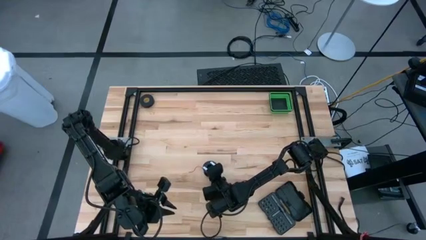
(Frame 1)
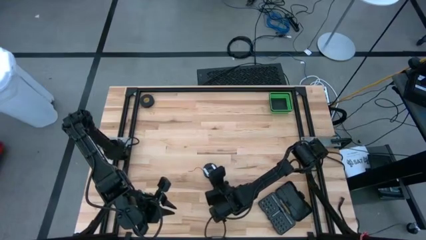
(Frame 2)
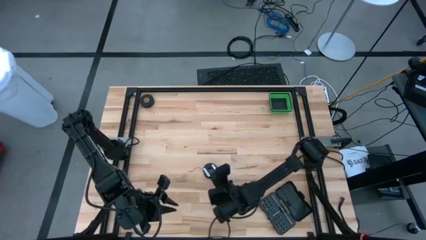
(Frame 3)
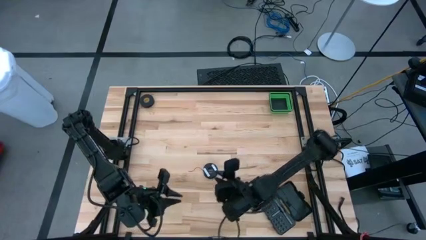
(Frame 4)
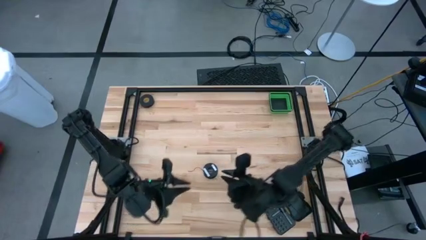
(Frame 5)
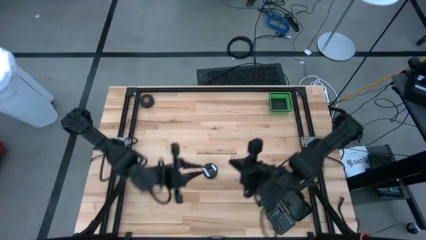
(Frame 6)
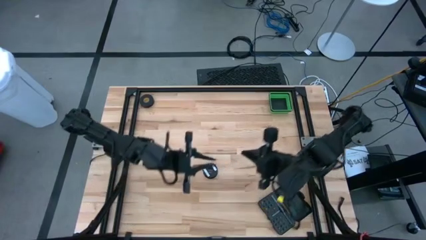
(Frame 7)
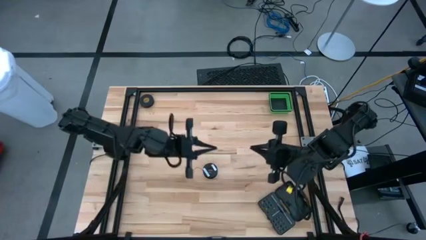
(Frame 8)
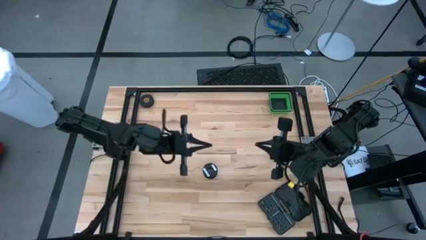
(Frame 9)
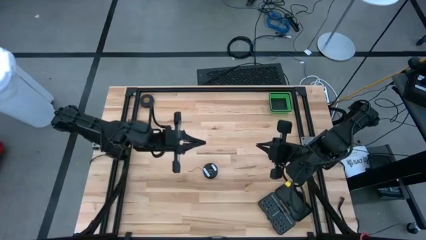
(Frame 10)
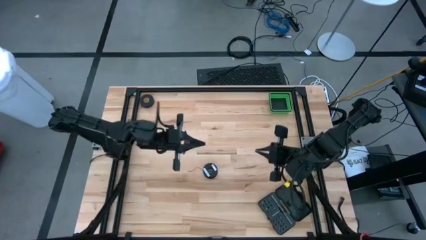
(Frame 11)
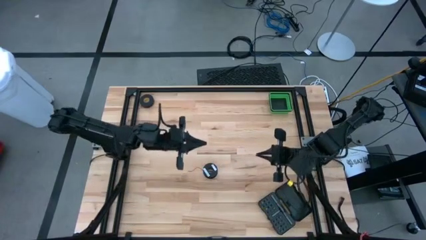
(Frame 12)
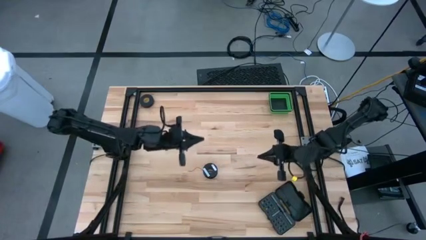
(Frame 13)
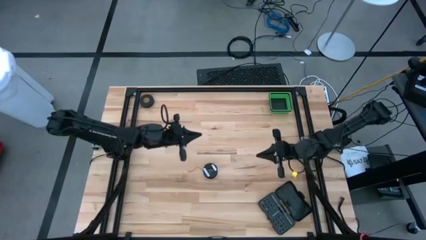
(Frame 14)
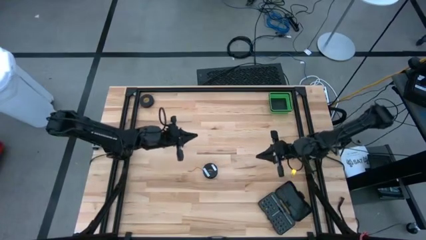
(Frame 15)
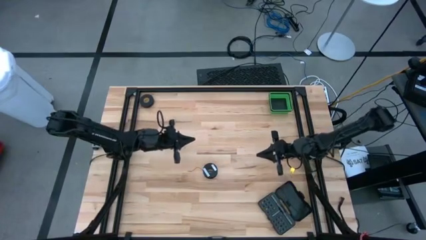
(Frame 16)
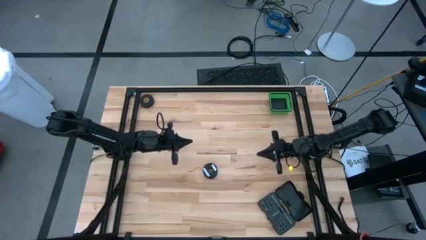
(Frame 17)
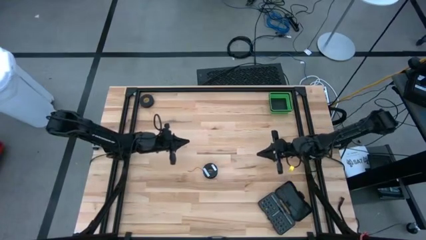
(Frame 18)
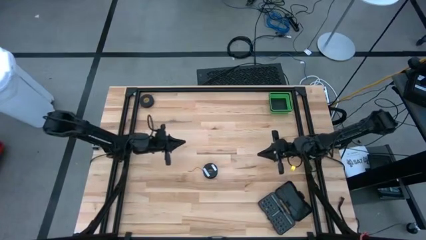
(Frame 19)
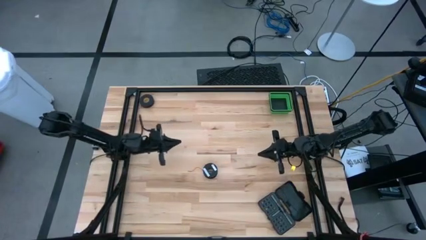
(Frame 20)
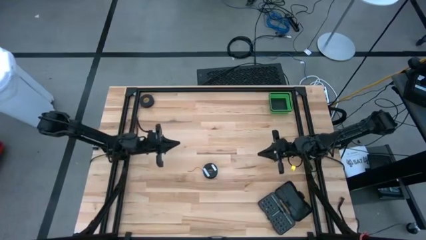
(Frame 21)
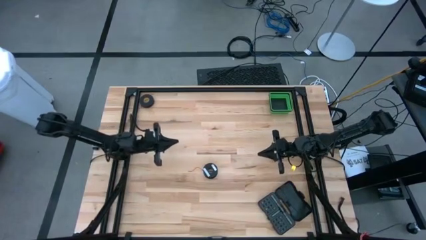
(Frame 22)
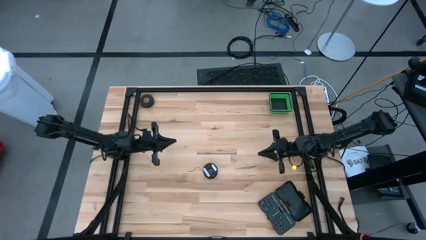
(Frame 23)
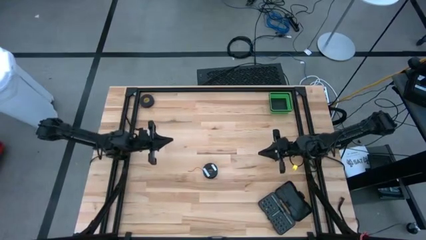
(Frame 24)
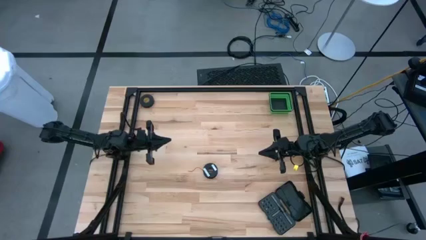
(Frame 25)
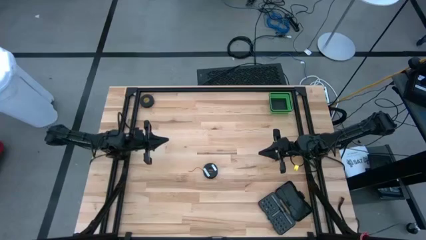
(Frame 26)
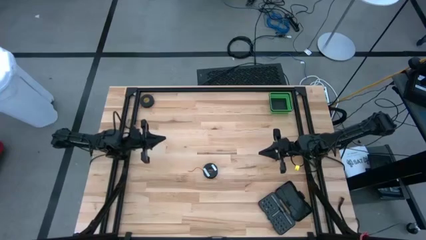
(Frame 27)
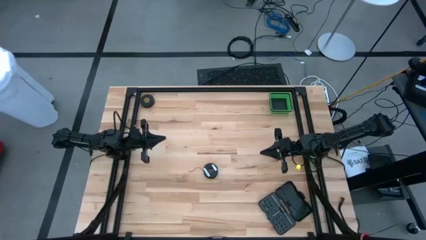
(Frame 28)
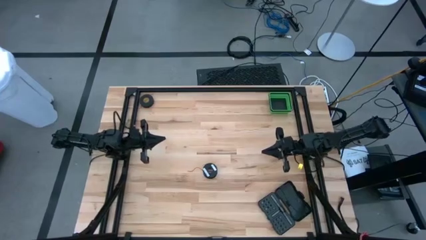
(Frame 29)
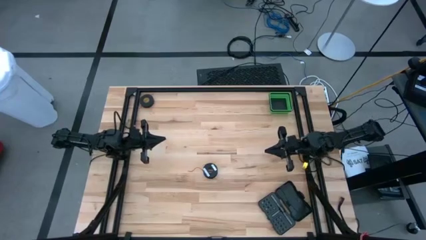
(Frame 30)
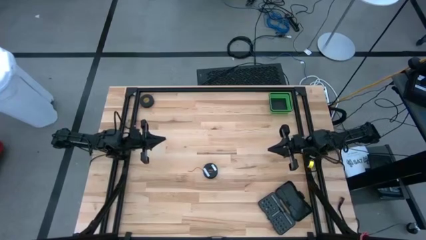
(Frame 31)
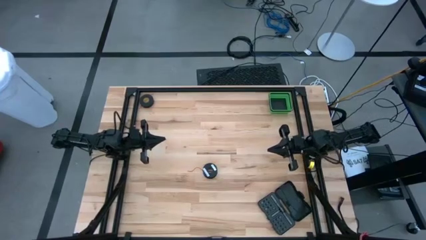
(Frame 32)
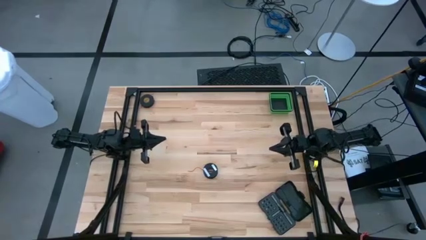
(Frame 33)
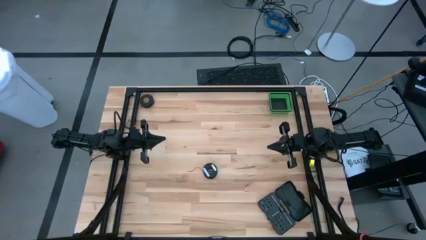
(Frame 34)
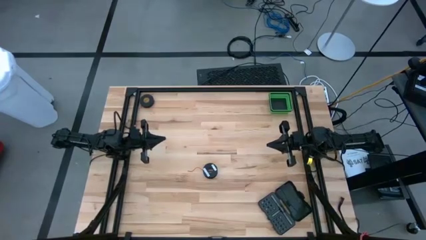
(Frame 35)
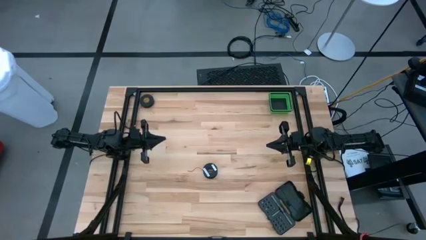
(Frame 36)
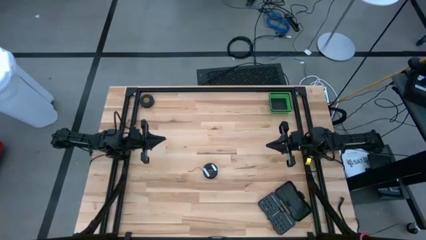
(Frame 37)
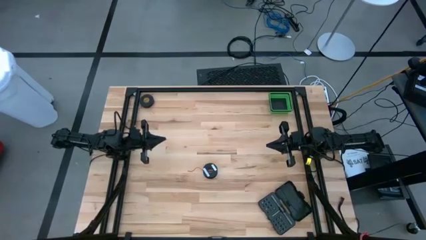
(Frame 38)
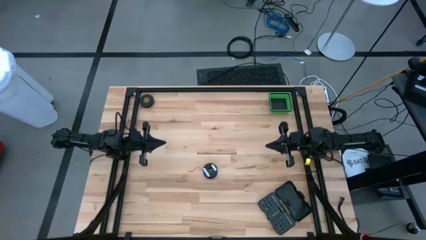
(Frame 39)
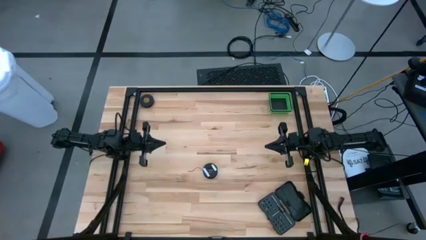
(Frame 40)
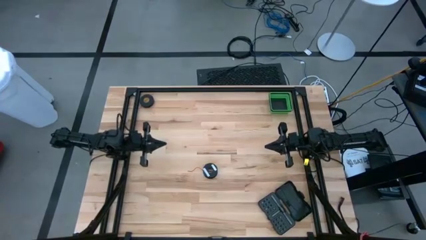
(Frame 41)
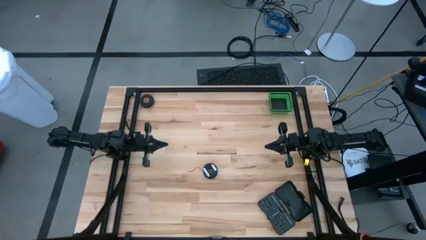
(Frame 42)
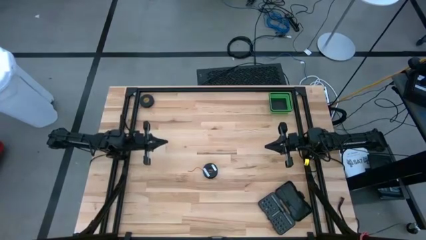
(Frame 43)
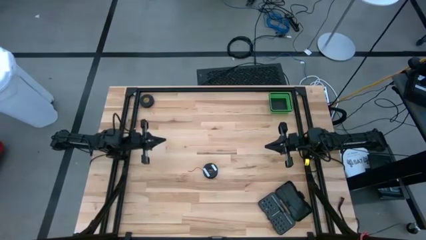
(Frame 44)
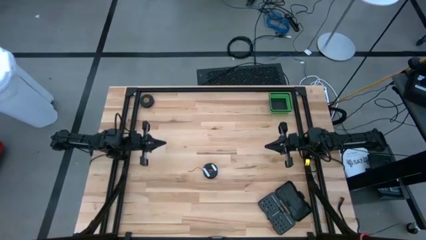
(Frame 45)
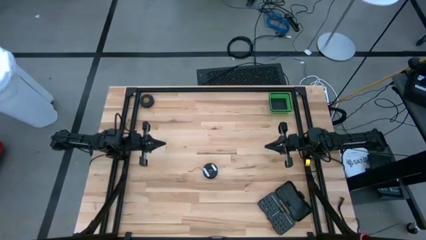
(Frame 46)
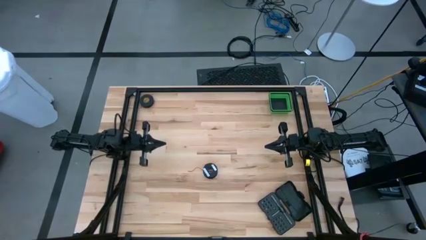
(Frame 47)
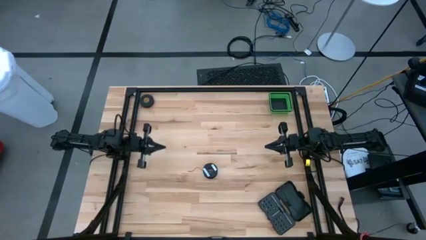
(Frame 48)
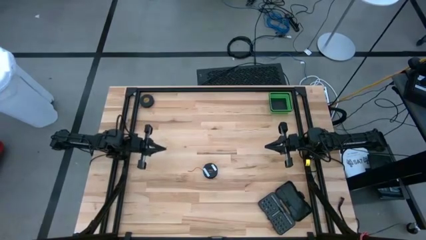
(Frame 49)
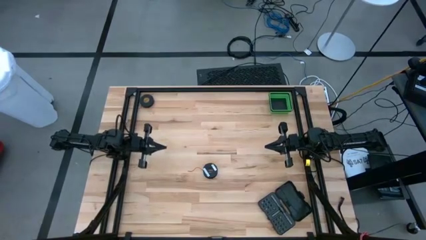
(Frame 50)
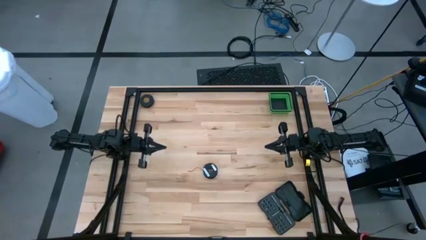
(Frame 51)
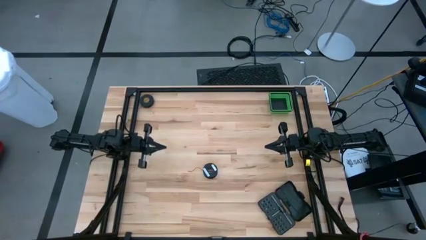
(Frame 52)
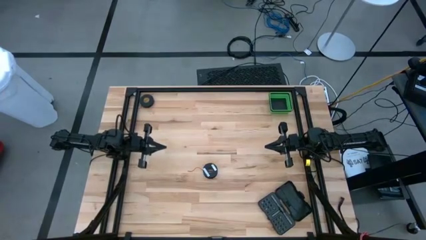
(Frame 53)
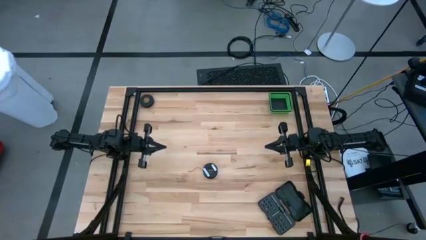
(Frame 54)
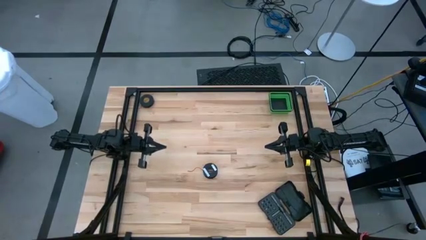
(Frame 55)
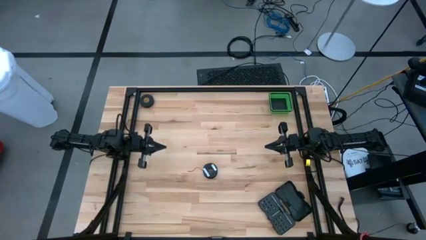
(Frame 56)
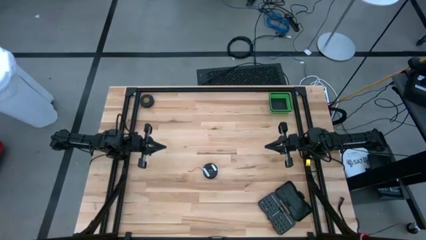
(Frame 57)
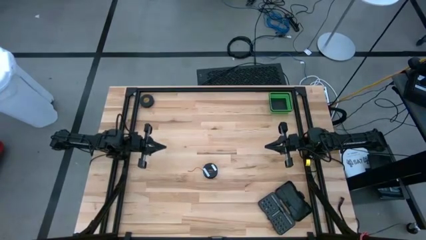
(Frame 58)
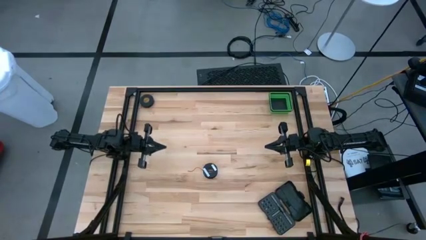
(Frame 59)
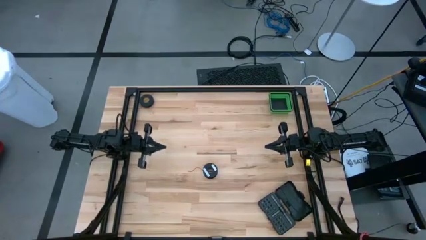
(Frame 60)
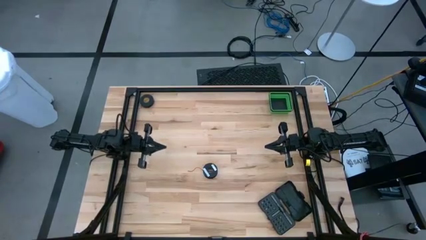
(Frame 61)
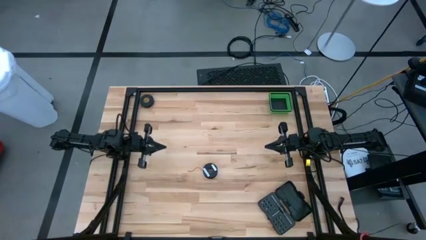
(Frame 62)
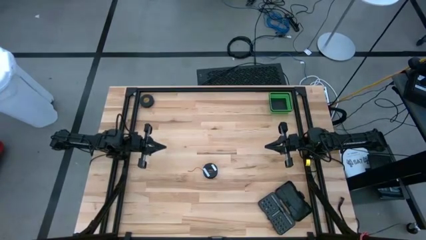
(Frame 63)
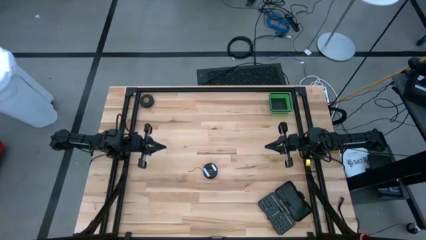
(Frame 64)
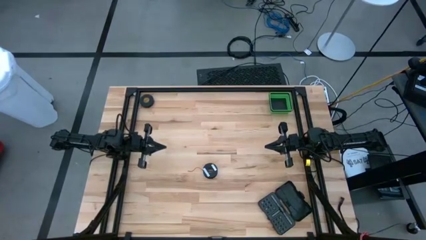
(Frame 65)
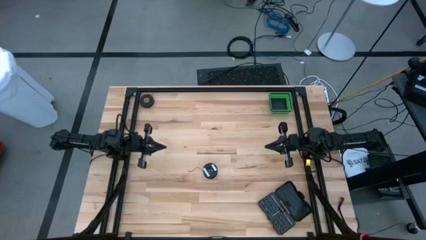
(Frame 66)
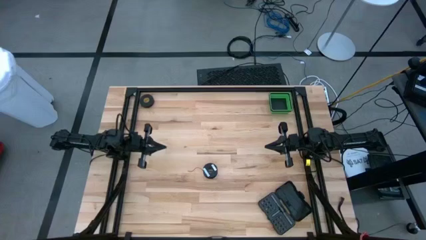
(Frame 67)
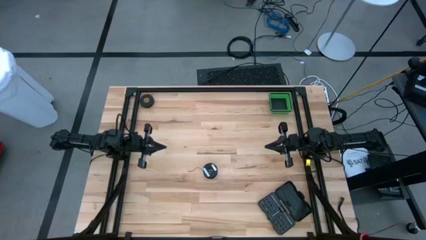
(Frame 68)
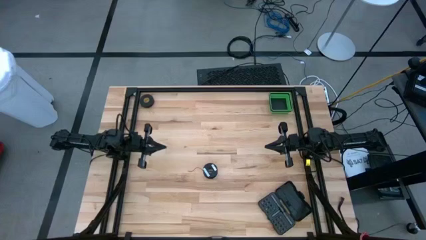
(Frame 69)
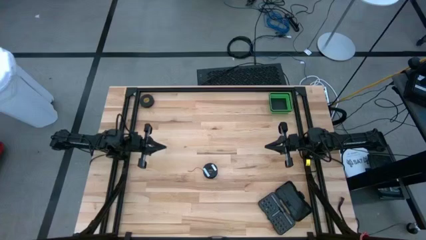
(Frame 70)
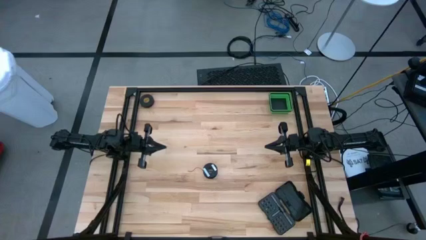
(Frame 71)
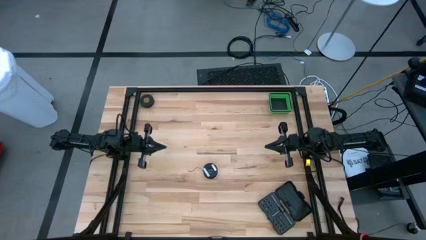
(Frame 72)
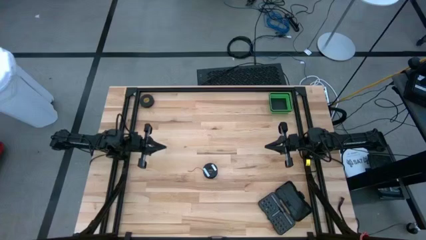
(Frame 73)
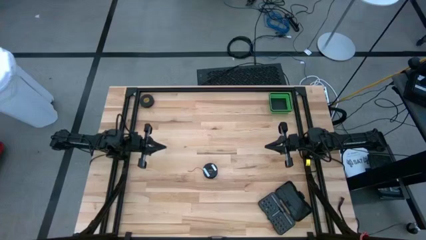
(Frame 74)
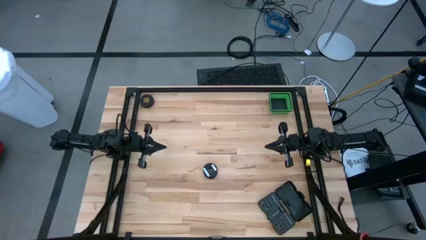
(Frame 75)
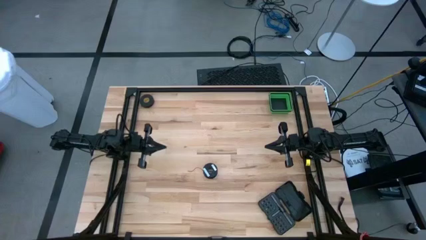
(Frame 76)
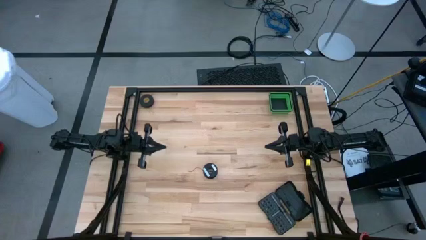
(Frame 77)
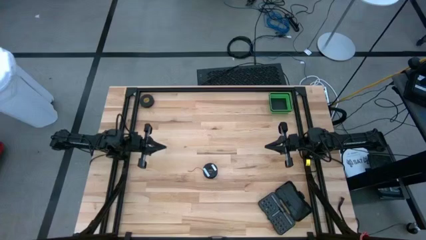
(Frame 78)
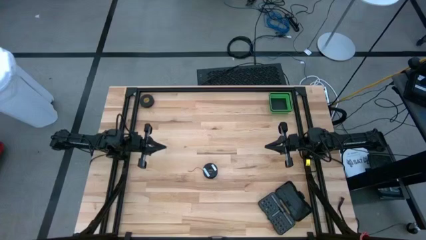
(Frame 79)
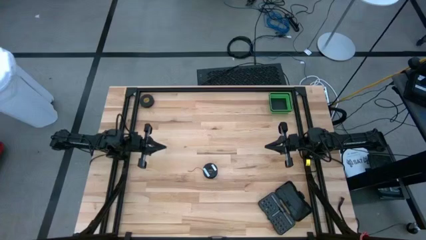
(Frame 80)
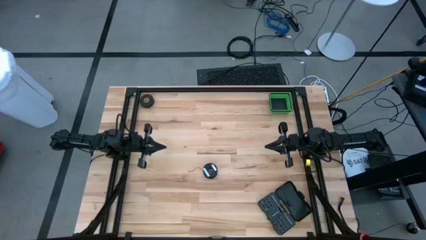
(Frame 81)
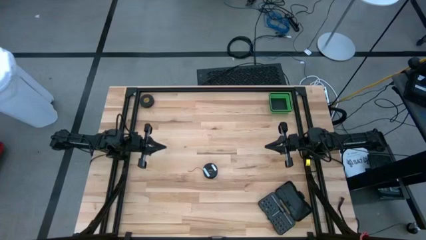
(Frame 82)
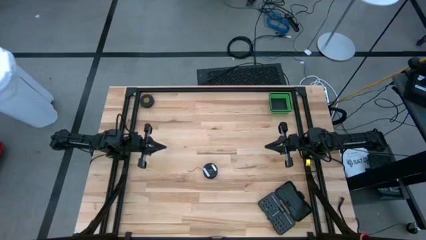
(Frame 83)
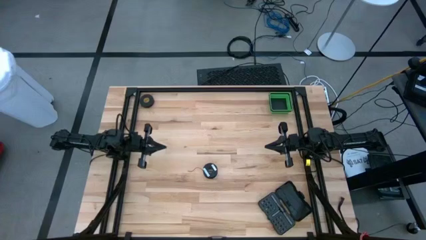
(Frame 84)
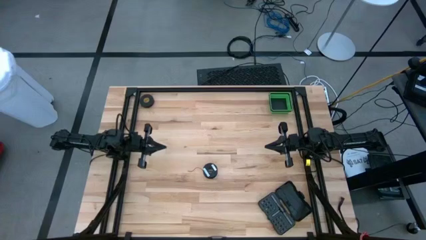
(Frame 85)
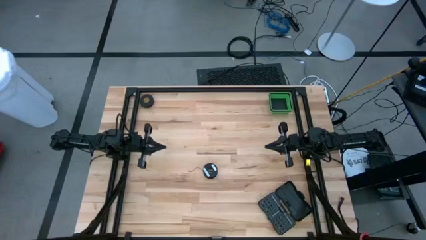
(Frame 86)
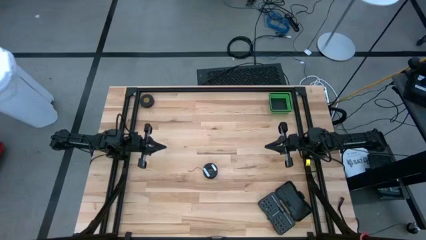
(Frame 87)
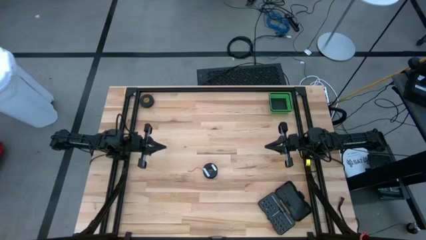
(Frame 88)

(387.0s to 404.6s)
Task: Coil cords
Return to Home Position
